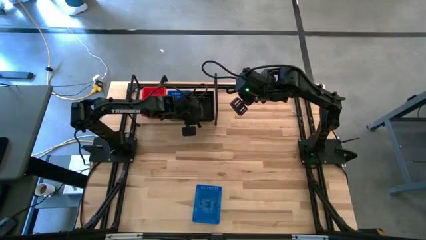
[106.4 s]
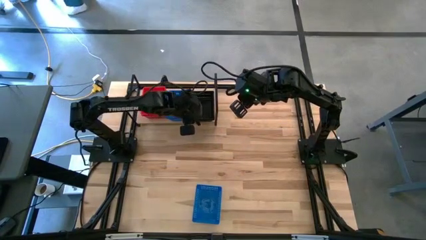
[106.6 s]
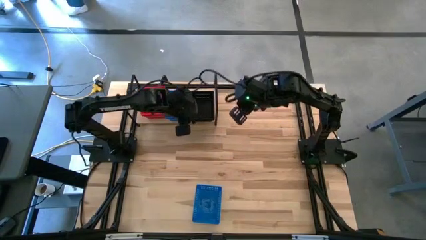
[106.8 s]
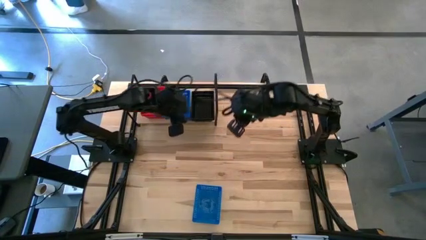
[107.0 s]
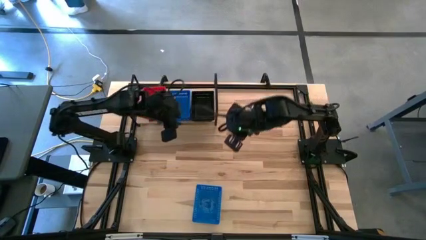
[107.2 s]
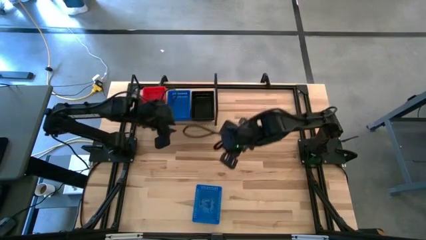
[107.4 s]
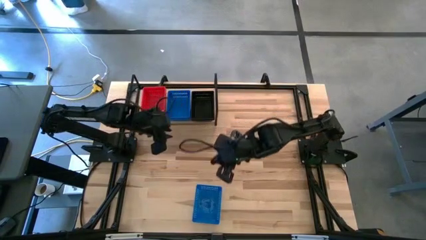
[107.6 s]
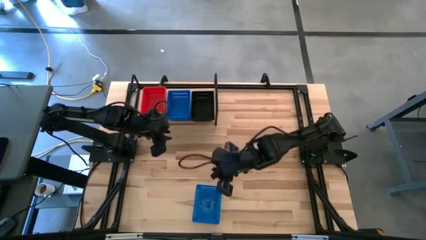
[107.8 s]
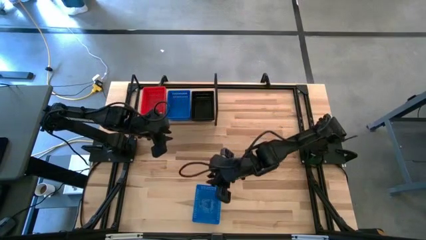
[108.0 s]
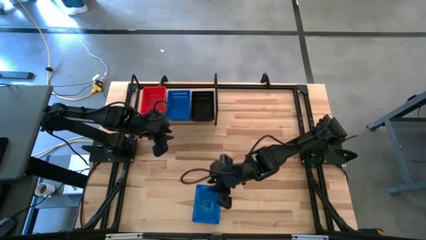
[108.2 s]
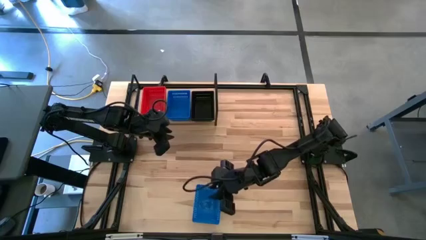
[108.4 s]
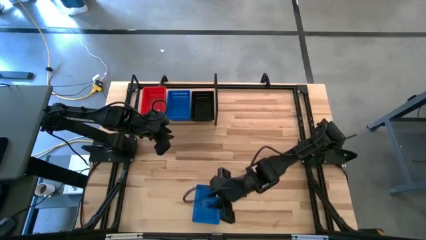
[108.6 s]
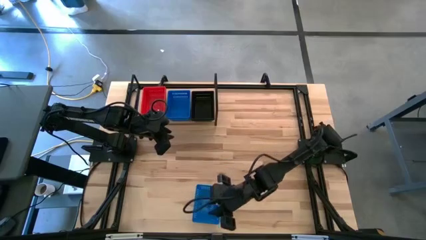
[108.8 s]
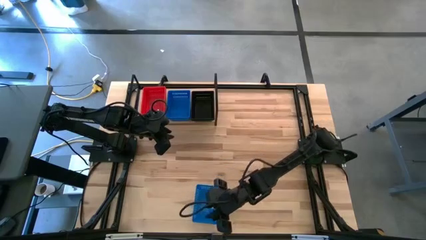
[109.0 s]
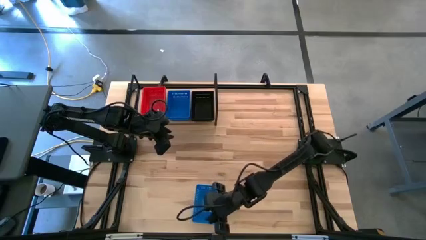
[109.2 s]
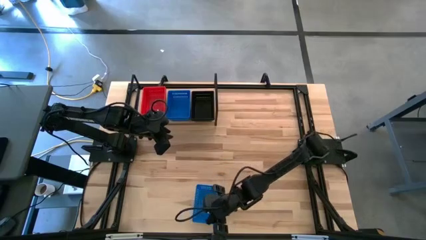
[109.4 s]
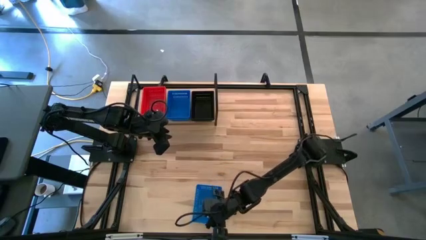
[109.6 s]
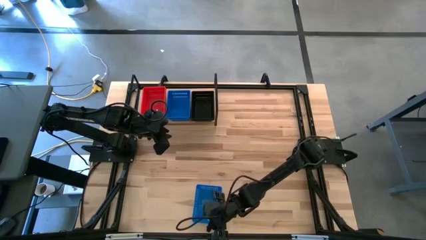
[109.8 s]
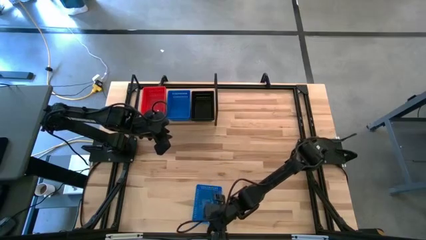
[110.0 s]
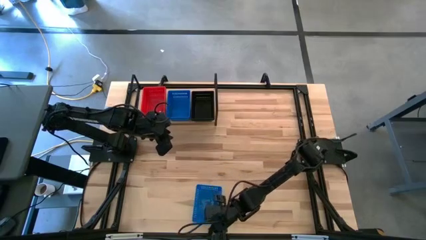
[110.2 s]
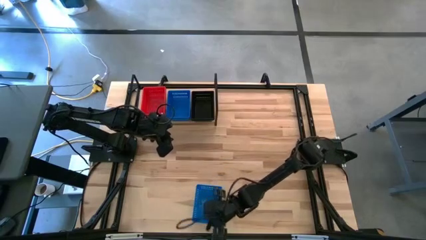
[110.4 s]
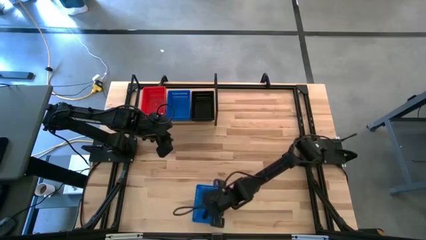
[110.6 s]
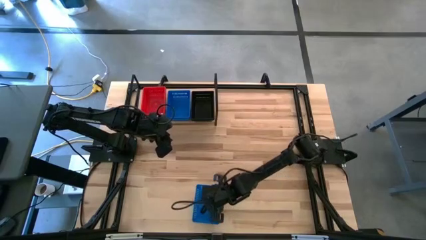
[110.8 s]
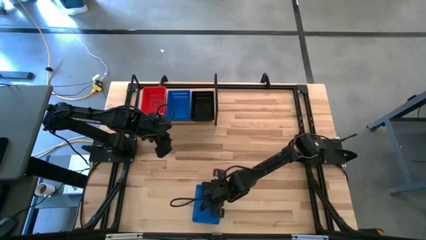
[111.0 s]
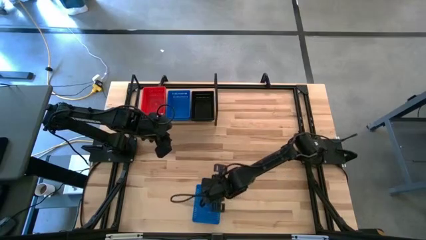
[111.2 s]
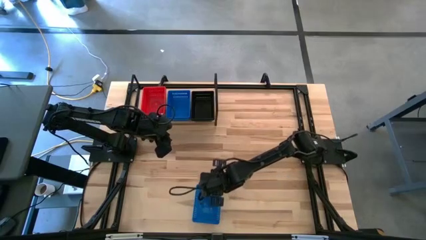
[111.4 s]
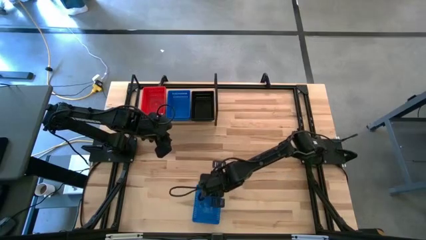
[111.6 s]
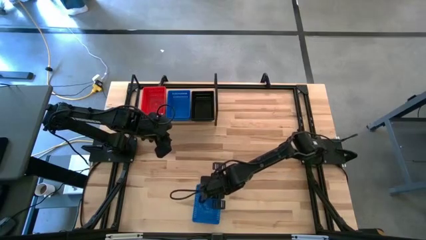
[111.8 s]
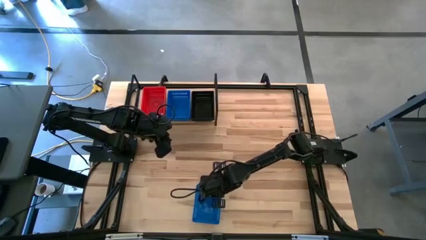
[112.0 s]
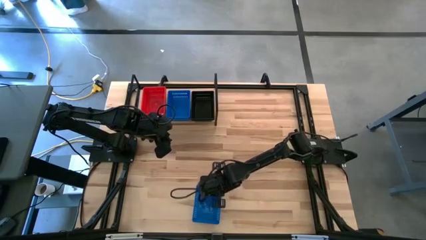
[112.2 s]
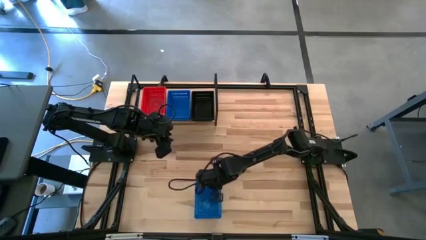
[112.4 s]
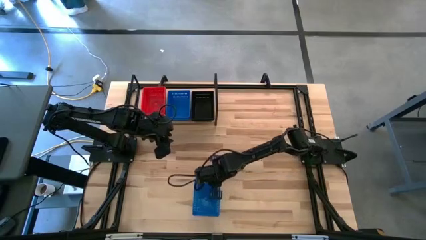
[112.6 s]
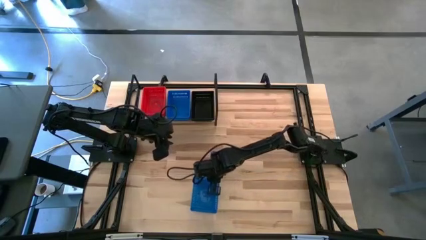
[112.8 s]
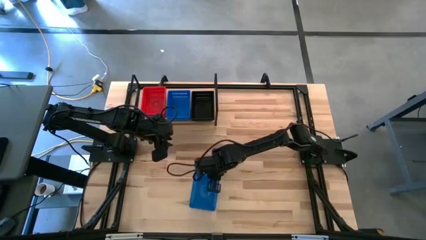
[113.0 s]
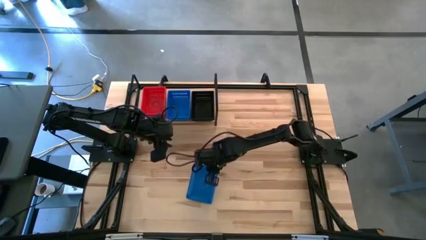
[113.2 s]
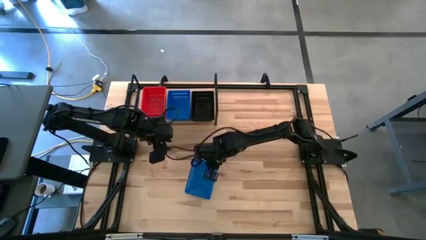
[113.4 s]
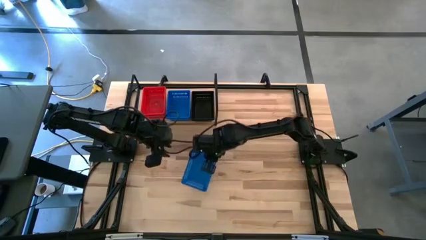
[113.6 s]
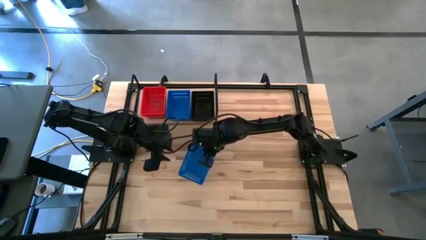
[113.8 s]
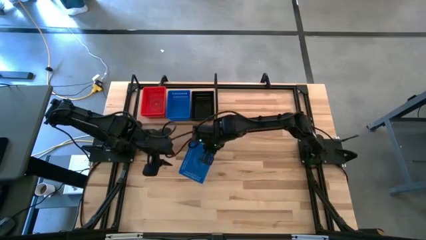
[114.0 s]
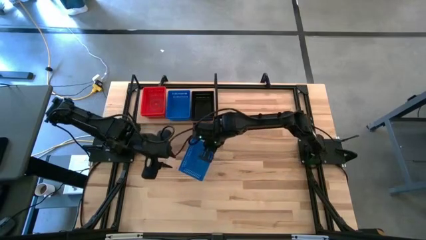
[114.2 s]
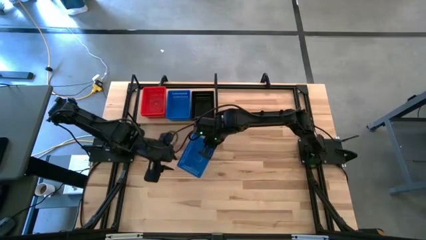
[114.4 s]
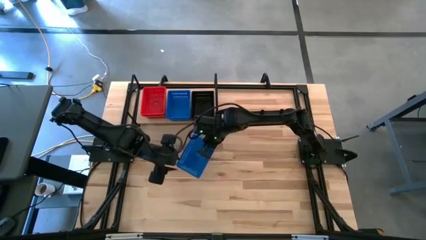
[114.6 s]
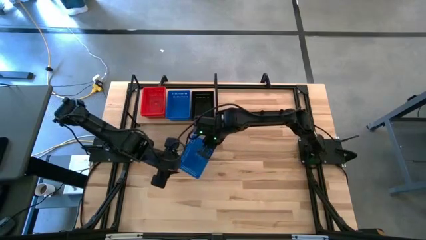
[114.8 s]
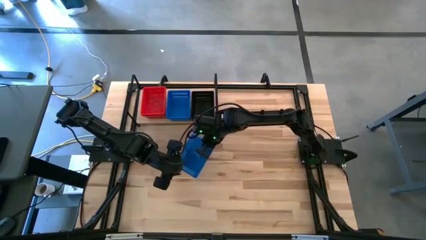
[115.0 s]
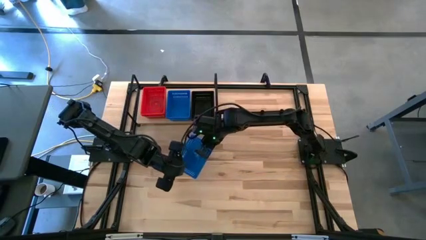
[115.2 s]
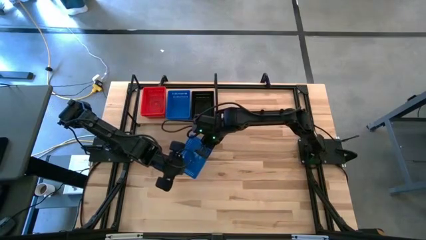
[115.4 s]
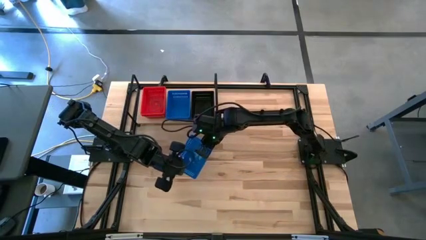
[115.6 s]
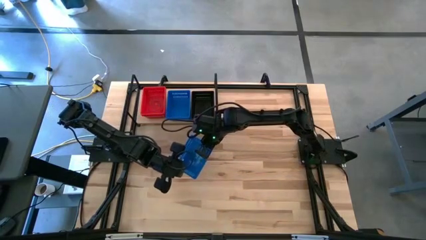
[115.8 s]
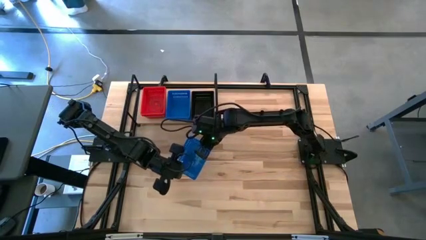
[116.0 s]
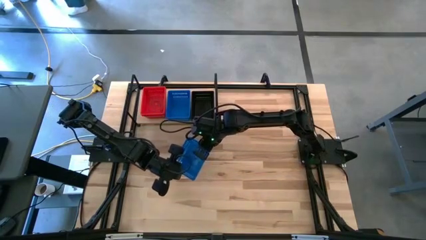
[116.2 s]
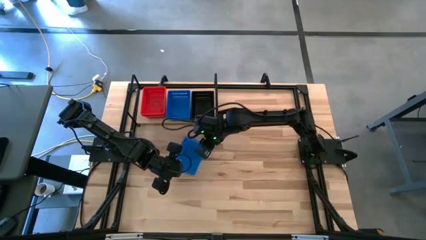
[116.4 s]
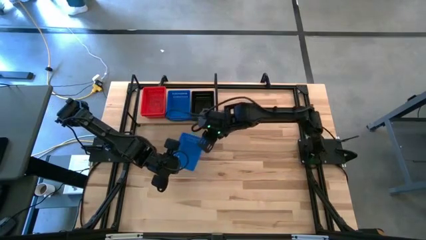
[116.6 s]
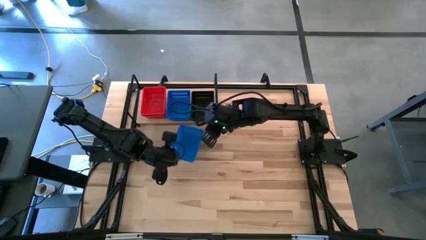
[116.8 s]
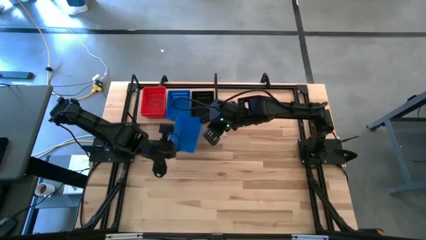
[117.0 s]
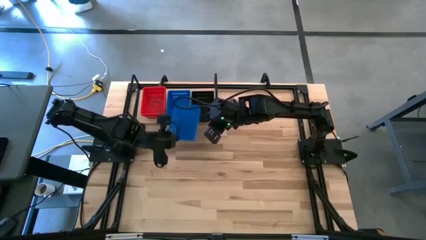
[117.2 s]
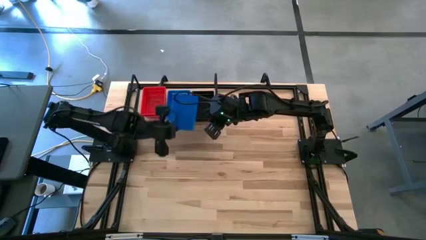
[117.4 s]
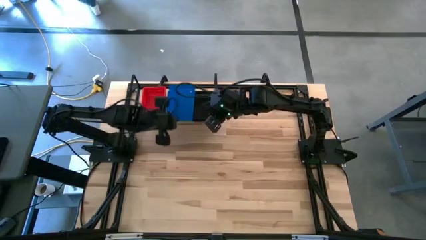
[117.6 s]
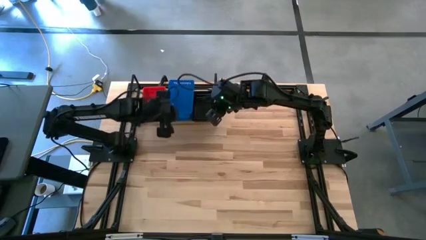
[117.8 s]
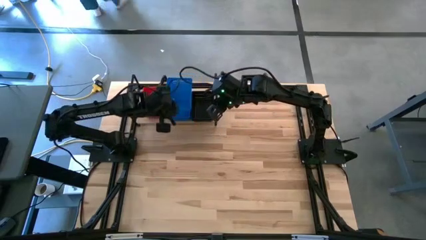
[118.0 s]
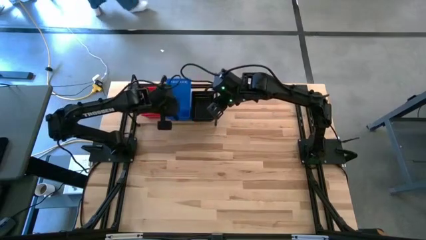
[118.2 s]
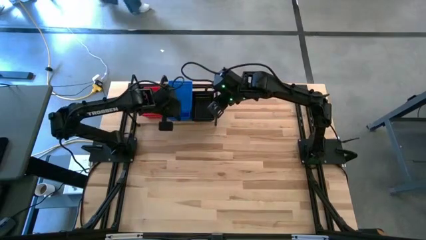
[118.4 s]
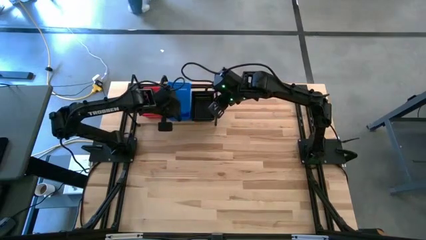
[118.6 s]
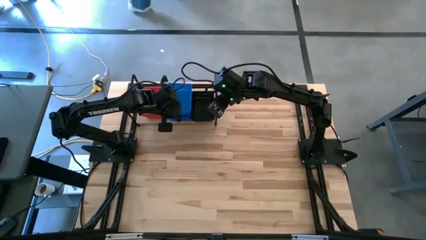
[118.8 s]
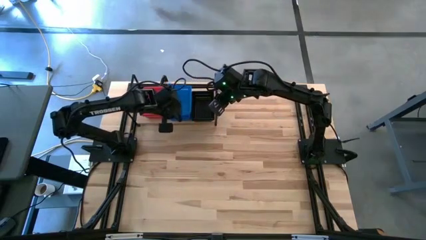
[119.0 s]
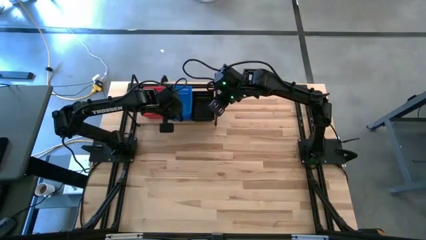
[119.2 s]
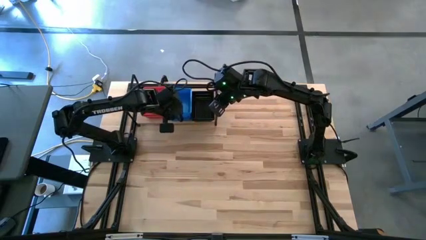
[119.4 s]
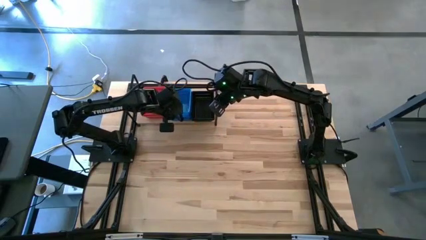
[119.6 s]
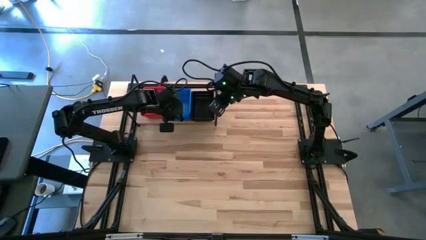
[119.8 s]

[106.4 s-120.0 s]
Task: Stack baskets on shelf by color
Stack the blue bin on the other blue bin
